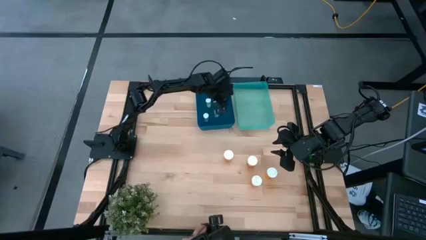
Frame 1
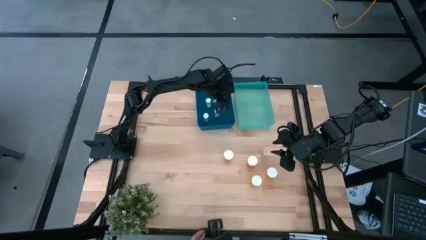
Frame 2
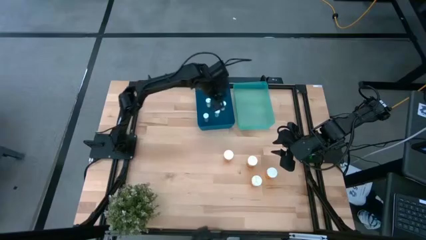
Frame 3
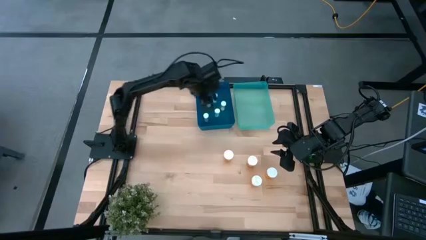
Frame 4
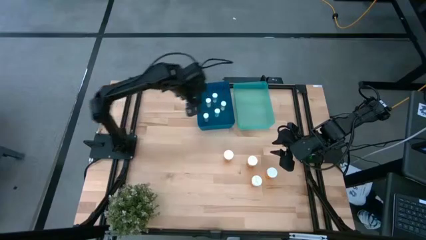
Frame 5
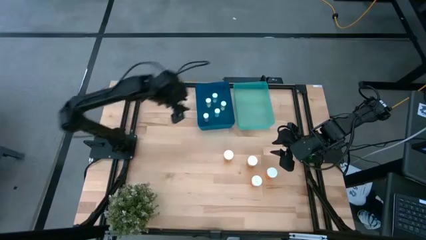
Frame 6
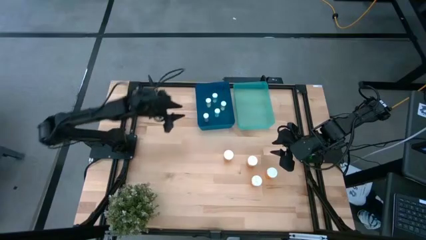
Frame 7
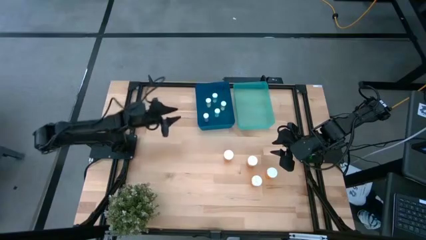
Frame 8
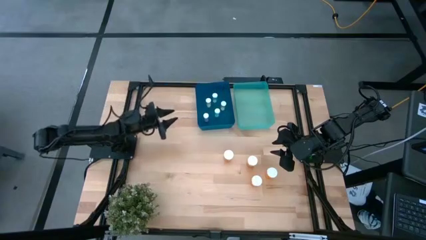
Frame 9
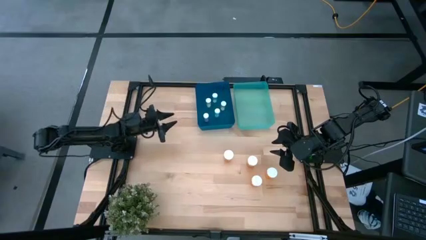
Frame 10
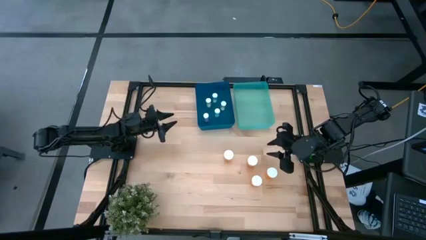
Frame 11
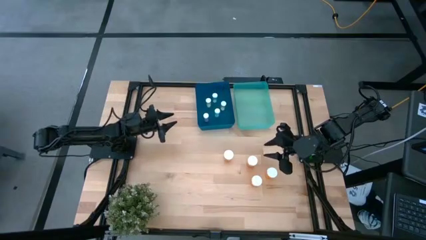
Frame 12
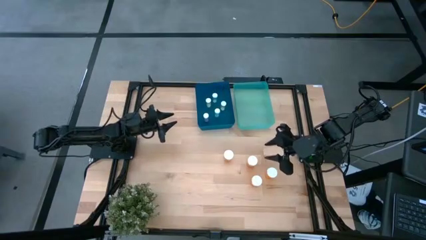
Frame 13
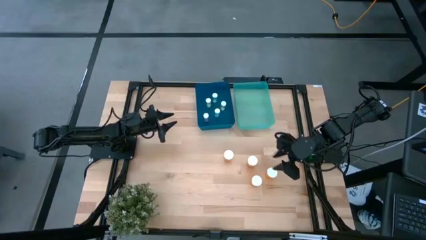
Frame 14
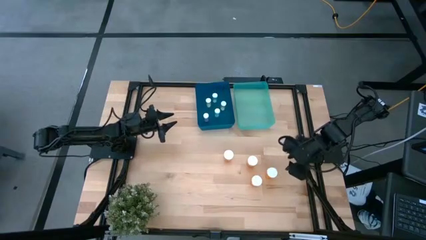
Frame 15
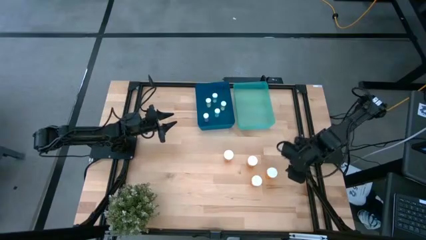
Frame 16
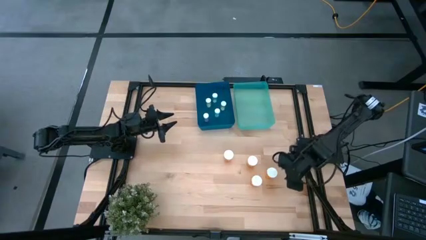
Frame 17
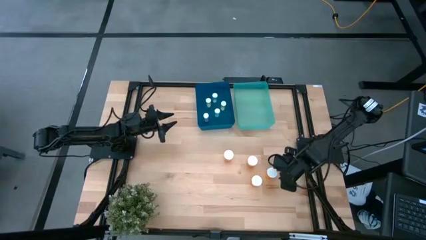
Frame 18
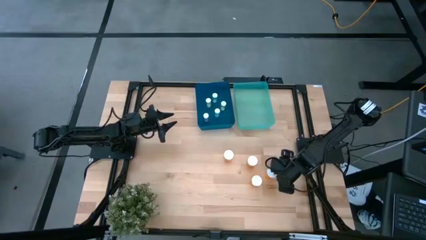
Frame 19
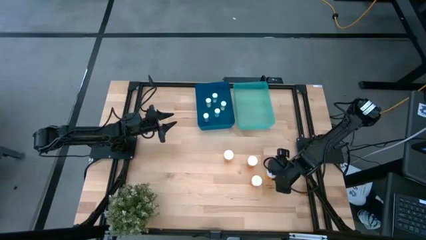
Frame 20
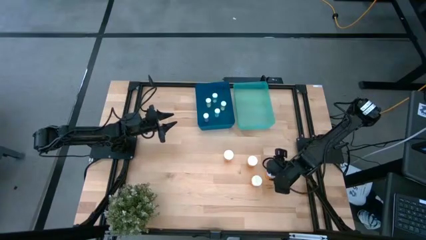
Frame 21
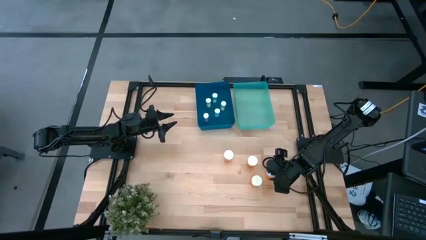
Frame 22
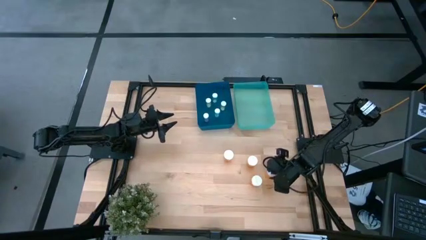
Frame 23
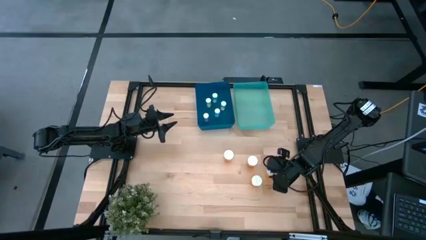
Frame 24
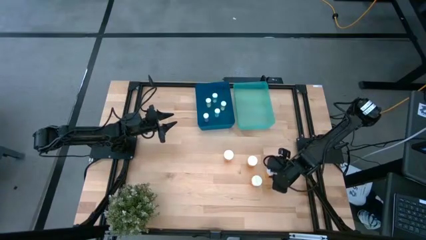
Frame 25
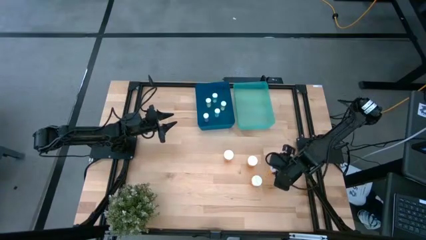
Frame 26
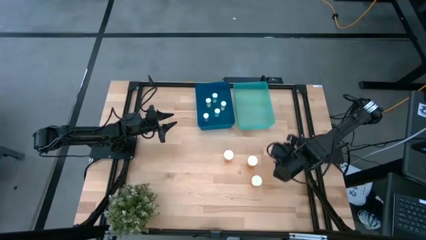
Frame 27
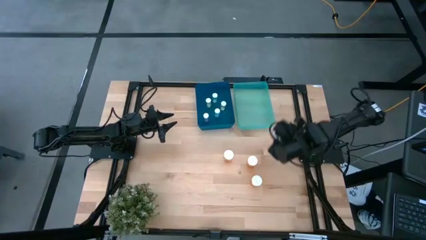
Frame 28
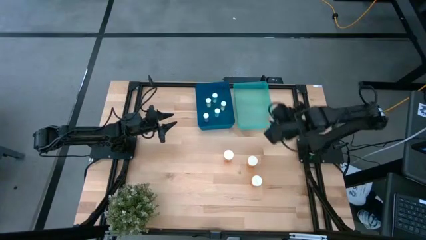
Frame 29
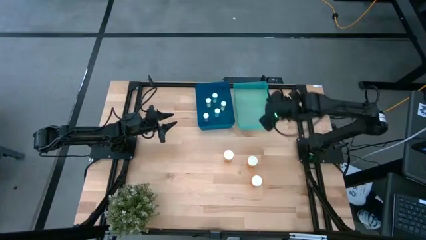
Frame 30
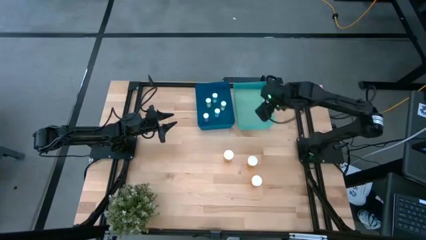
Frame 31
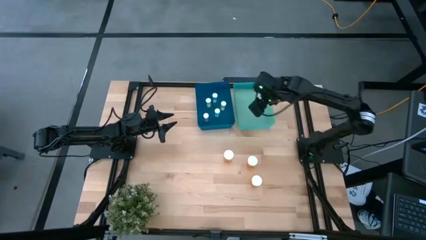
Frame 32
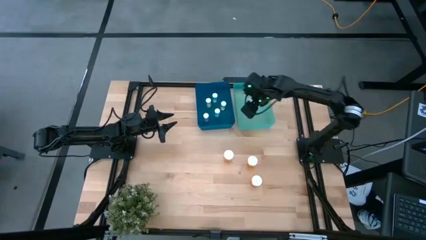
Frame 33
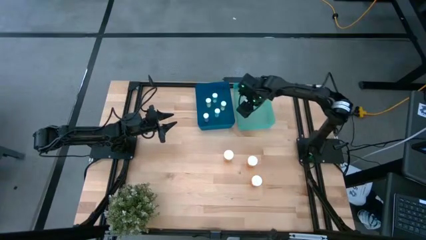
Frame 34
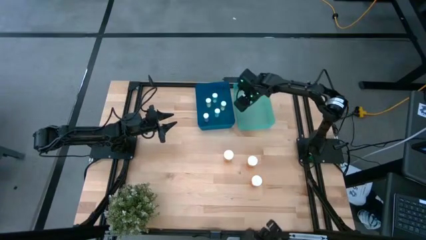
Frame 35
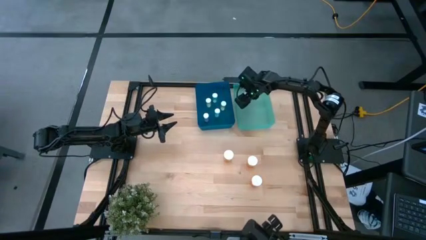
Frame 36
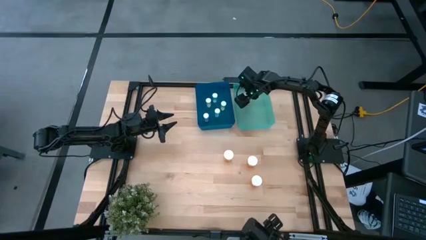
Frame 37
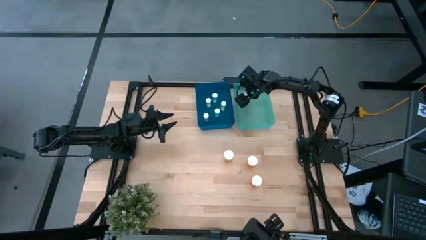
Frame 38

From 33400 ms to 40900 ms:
Task: Pick and place medicine bottles into bin by pill shape (circle, oval)
Put the orange pill bottle on the green bin

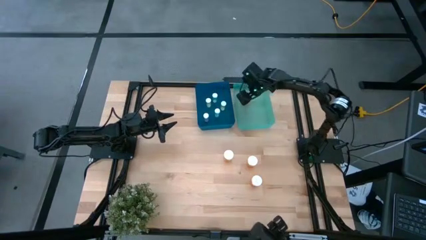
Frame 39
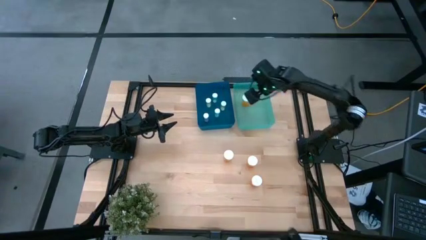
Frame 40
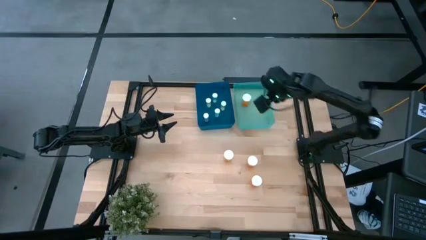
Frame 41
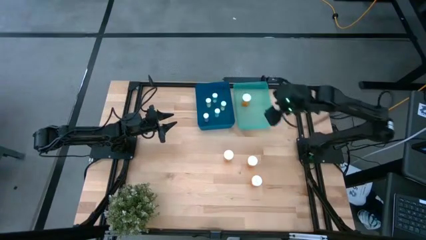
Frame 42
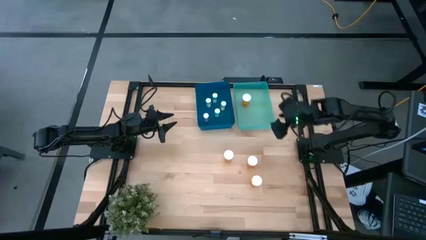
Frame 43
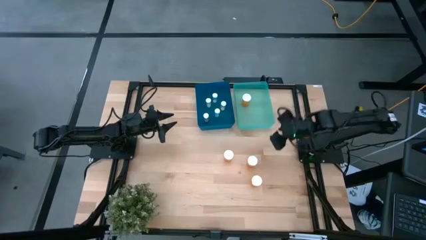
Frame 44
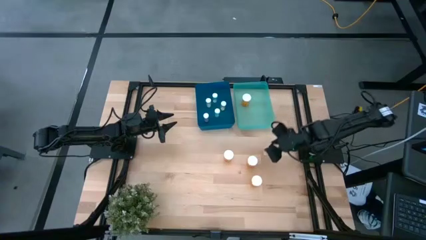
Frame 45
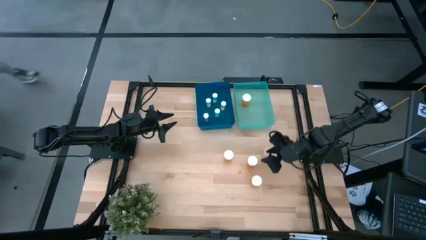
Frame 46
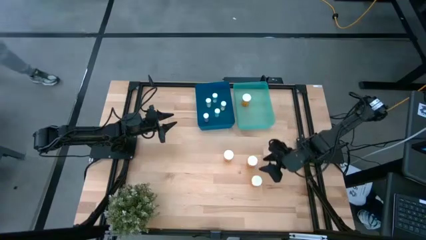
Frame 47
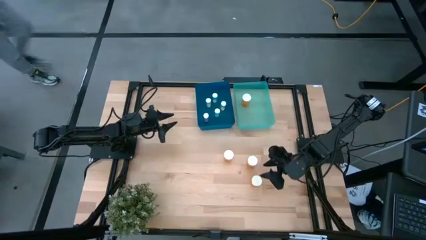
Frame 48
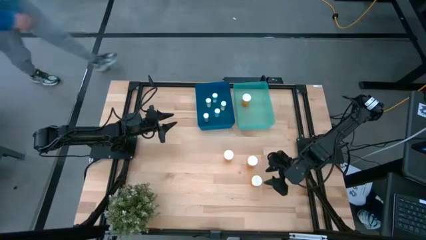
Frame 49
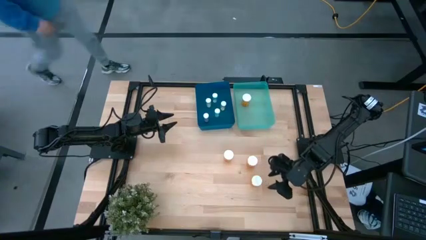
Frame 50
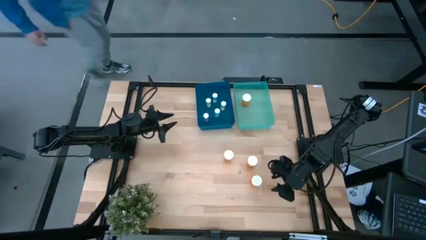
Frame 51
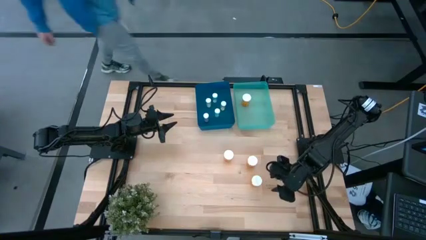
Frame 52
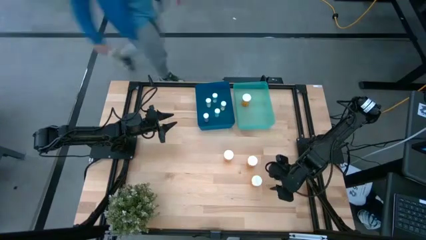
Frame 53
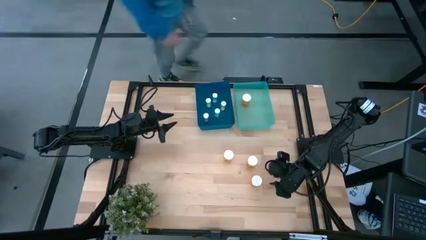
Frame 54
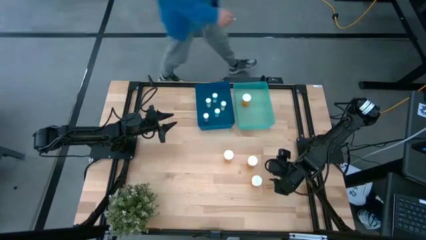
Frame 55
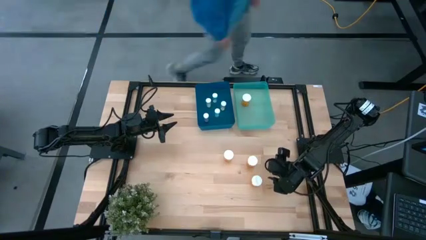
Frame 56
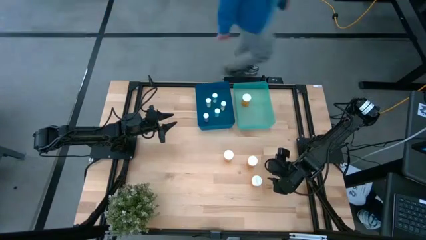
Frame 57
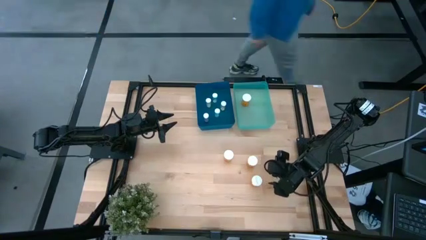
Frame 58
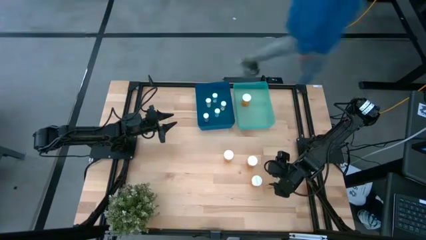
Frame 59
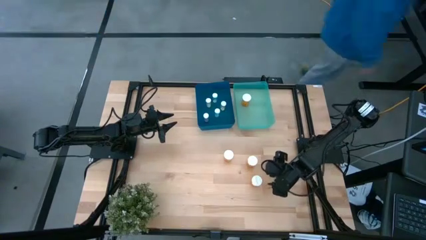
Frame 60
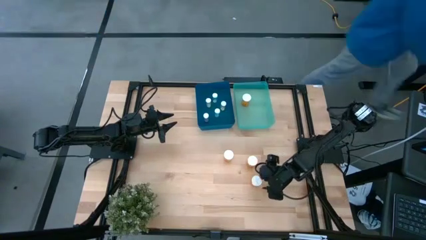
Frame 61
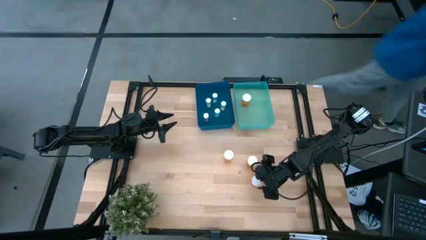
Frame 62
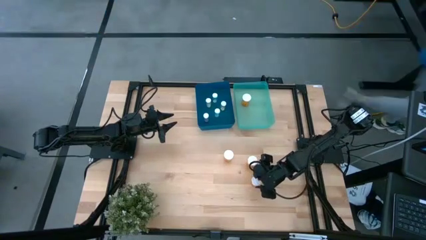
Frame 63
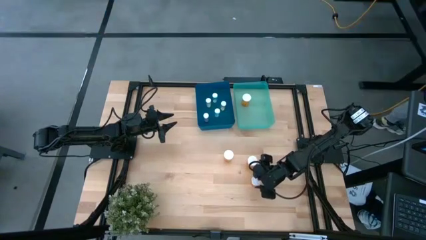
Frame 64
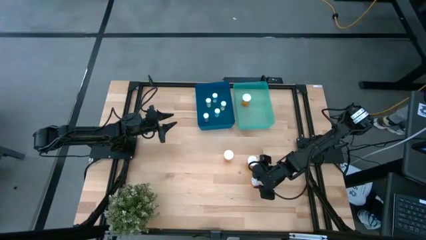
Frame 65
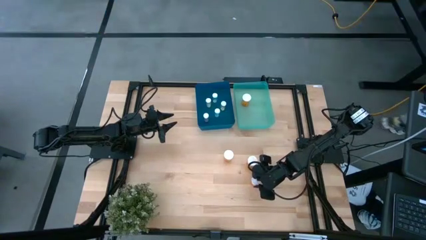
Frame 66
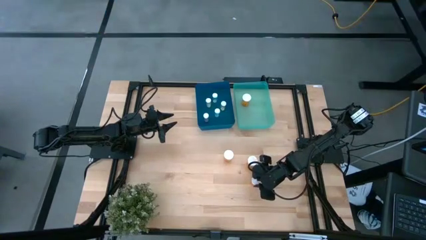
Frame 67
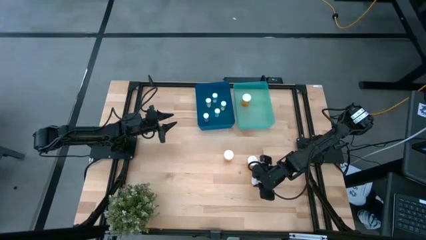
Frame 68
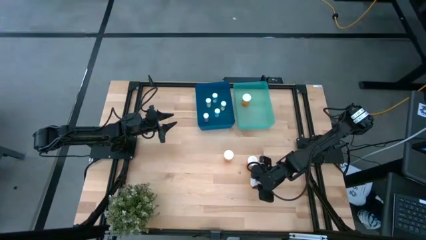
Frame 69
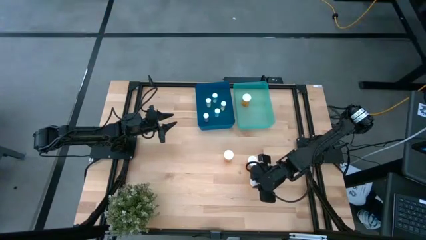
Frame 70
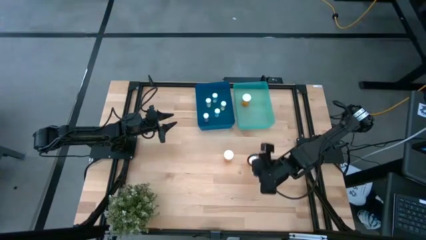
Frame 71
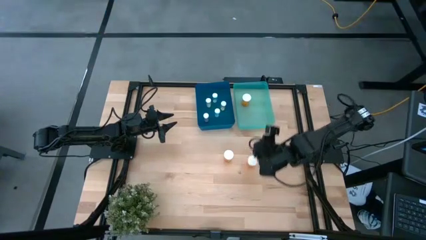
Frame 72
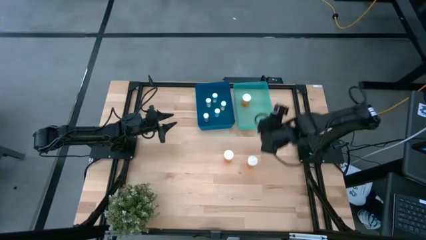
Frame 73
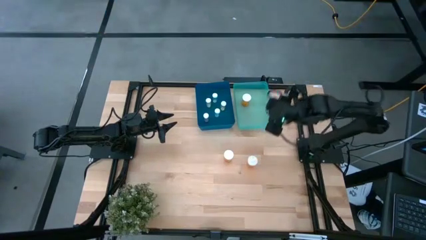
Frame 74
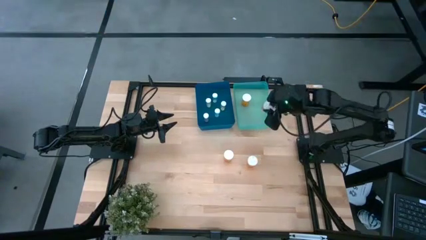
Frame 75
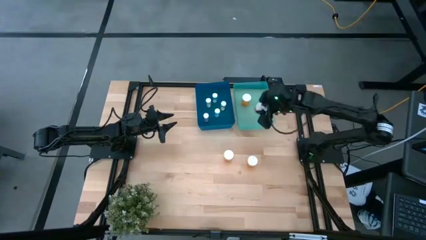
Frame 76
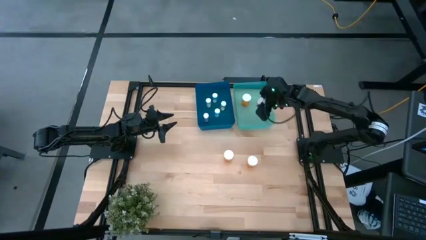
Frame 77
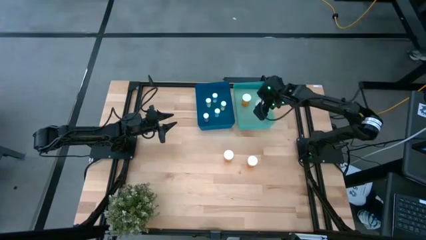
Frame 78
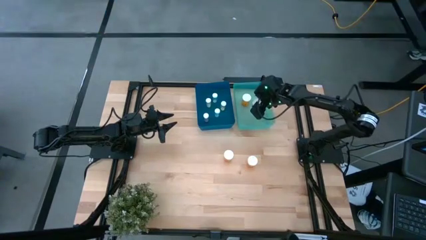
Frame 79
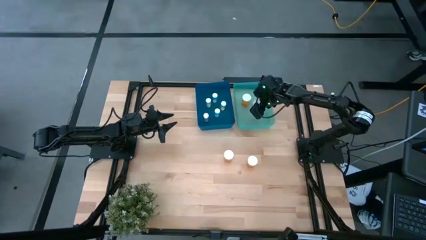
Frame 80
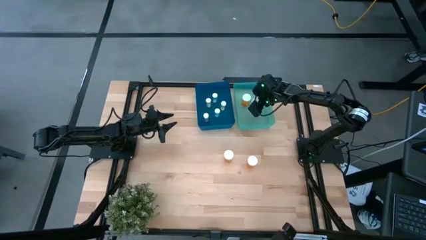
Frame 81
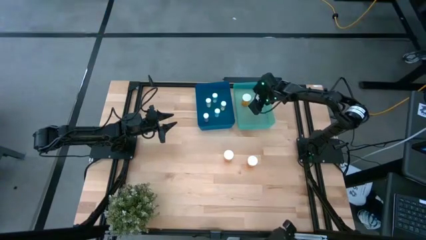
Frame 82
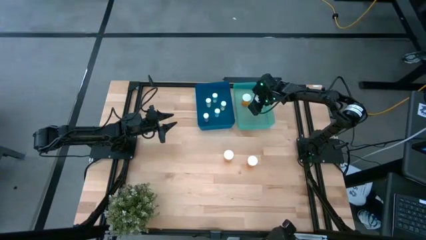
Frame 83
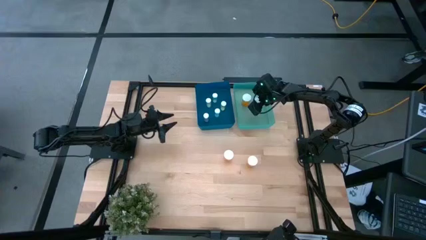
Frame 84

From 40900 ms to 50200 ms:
Put the orange pill bottle on the green bin
